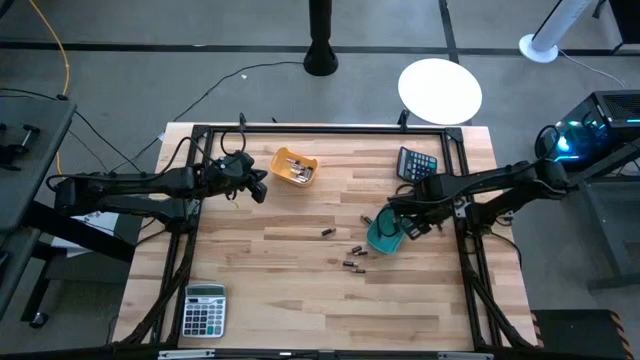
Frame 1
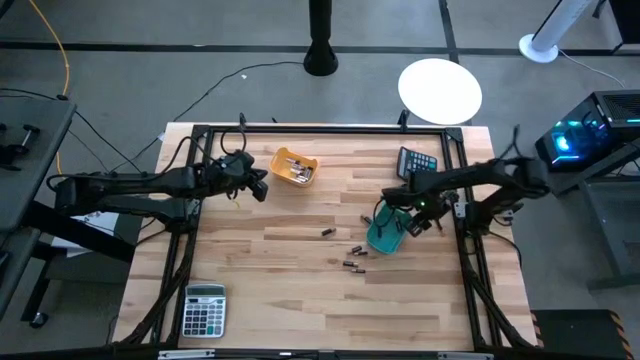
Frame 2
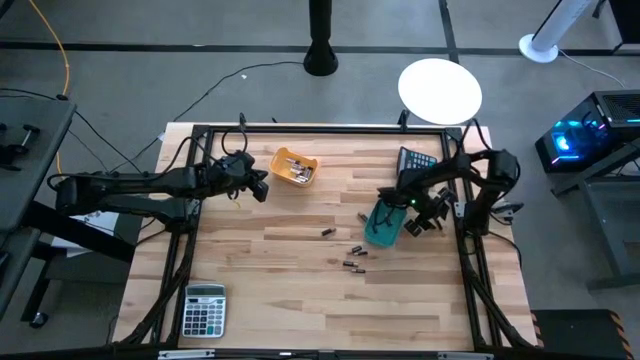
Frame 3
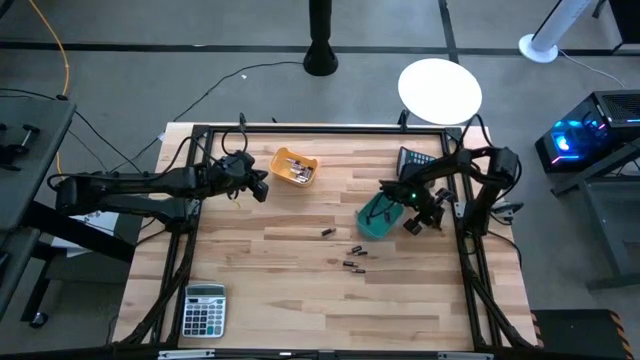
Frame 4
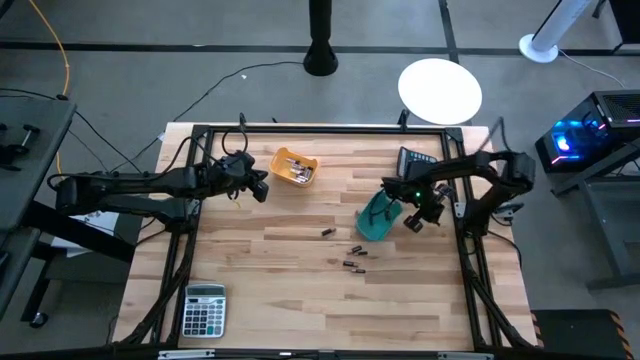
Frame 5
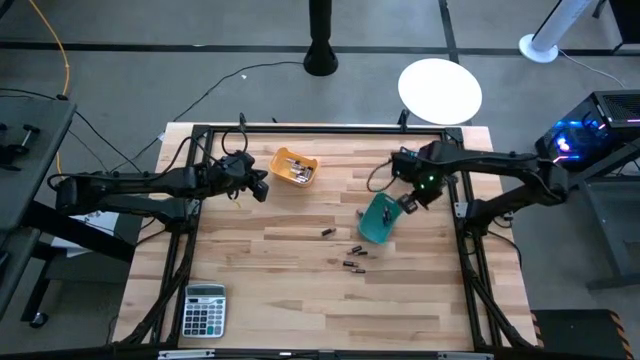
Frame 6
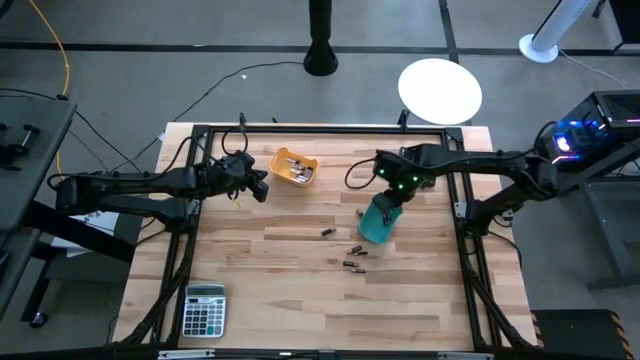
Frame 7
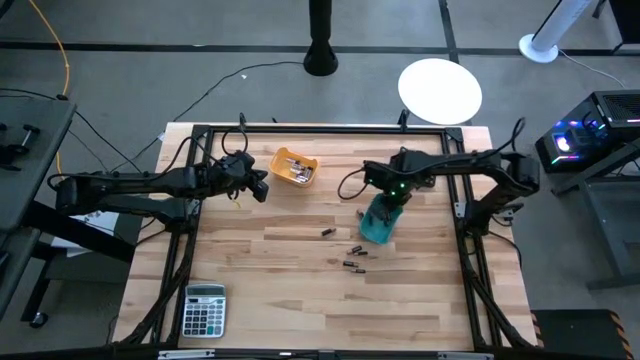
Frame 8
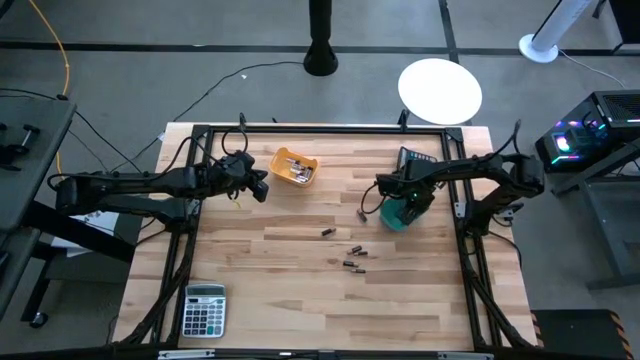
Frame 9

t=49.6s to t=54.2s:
Task: Sort batteries
Put the black battery into the blue bin

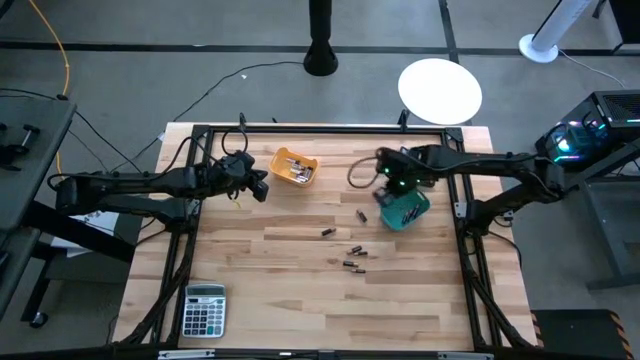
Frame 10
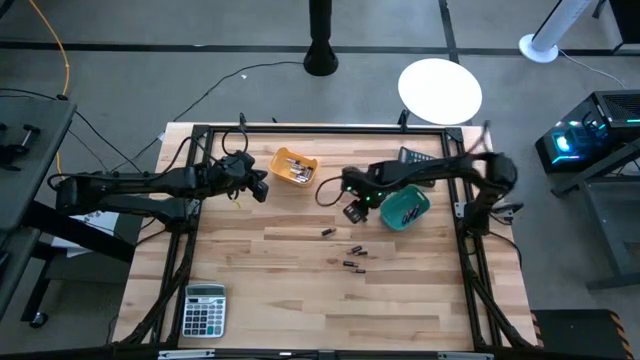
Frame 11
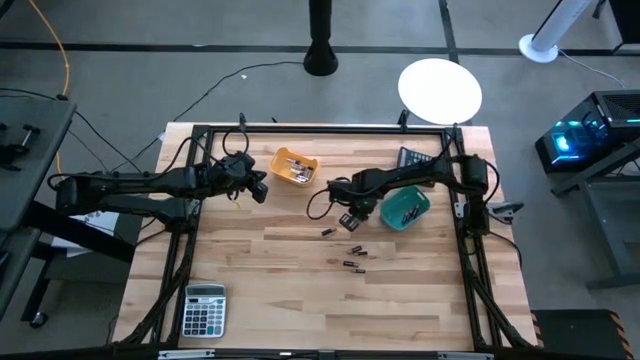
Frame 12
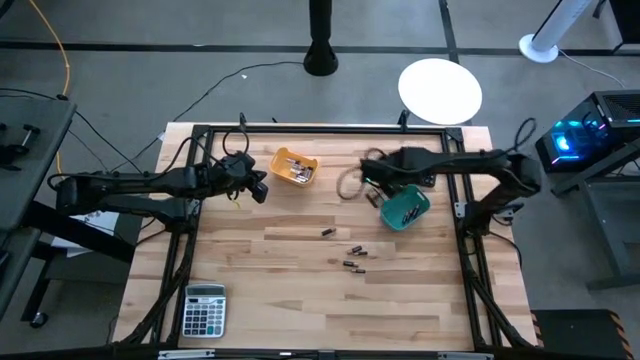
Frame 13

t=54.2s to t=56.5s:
Put the black battery into the blue bin

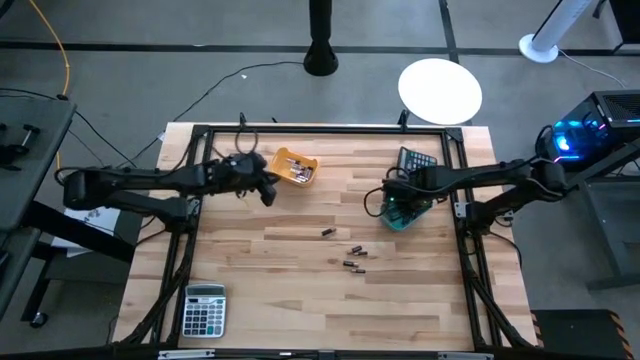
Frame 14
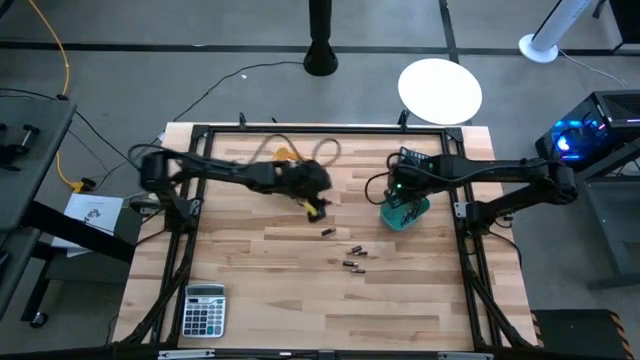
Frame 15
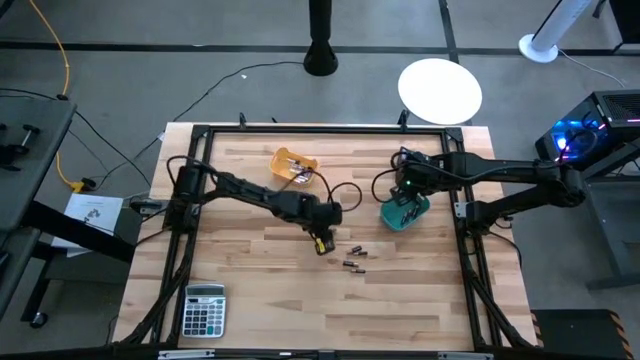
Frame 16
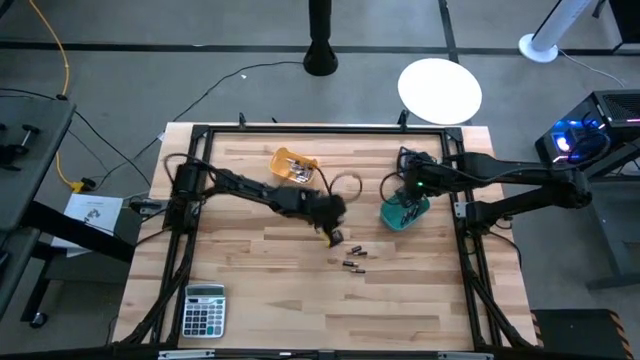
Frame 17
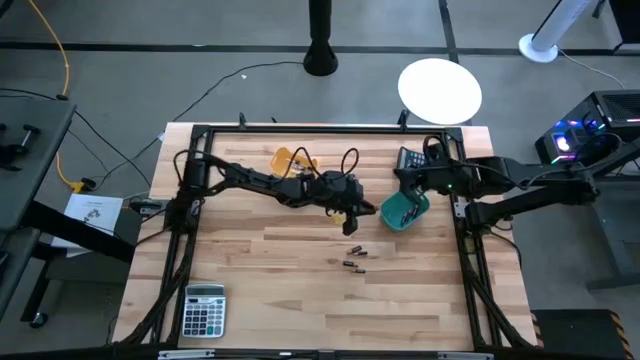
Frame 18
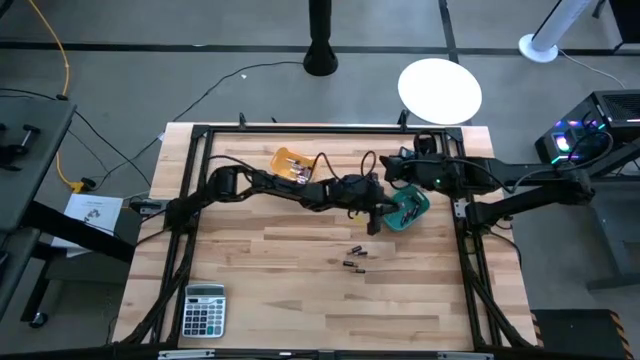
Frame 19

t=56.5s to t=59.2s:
Put the black battery into the blue bin

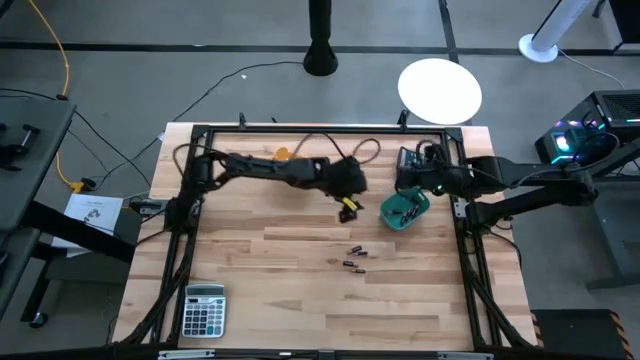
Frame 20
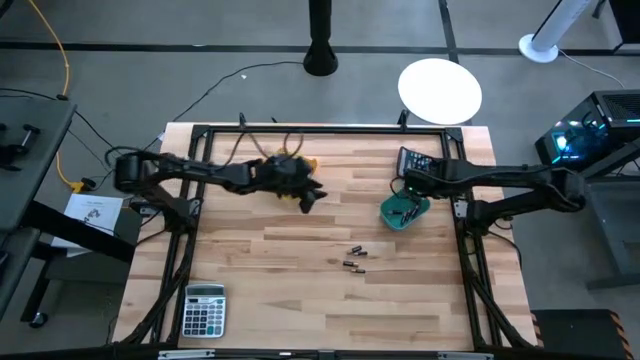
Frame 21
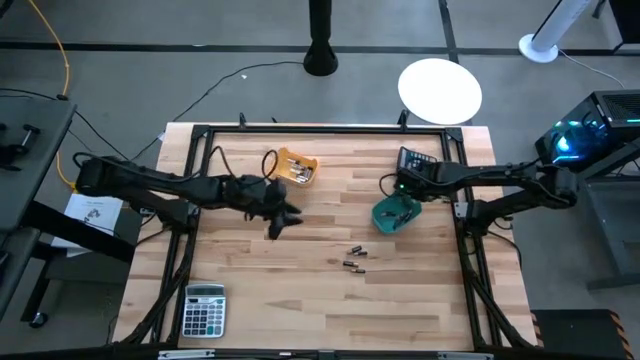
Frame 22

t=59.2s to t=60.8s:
Adjust the blue bin

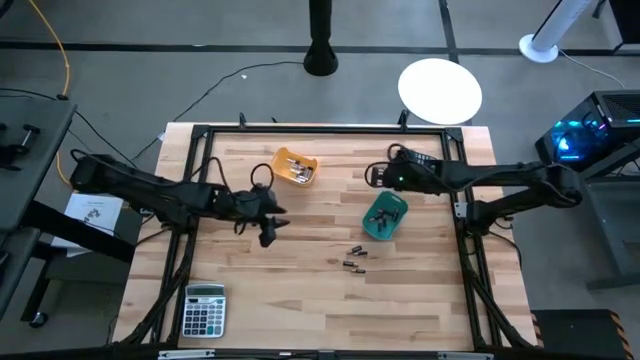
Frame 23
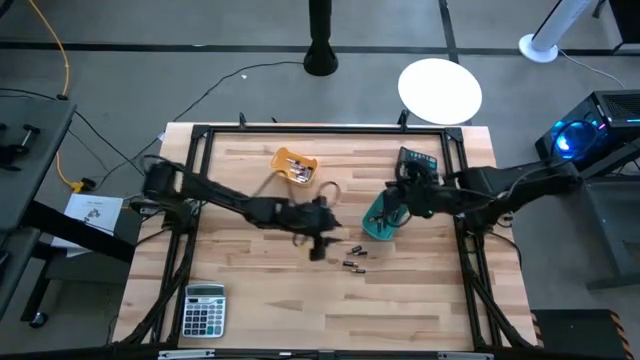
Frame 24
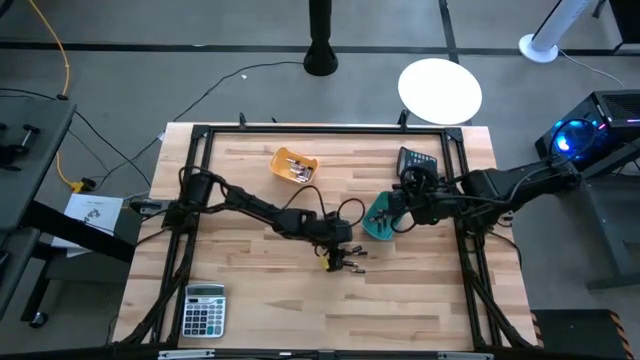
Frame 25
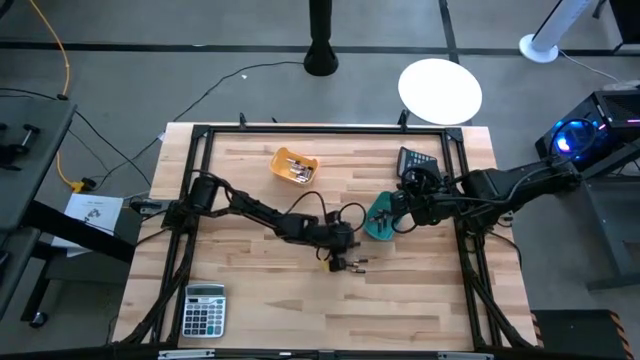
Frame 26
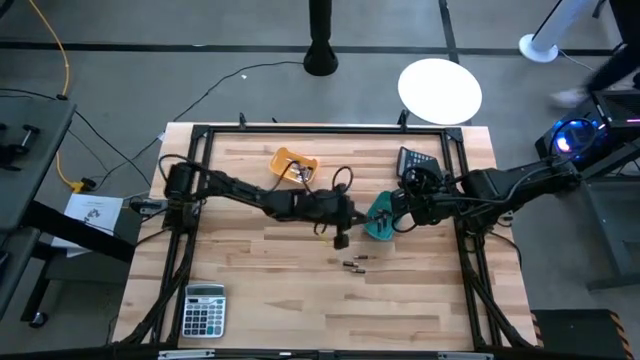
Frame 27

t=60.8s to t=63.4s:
Put the black battery into the blue bin

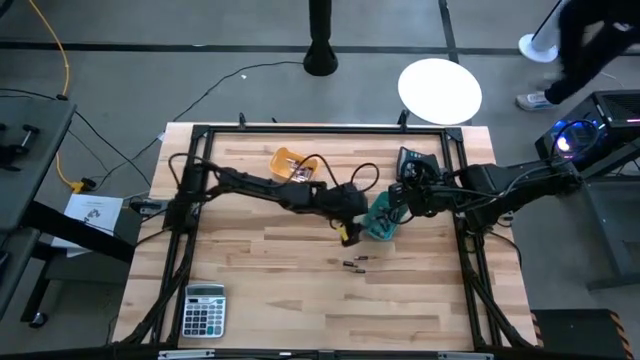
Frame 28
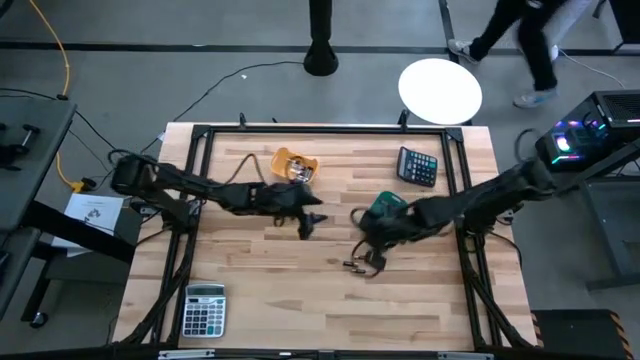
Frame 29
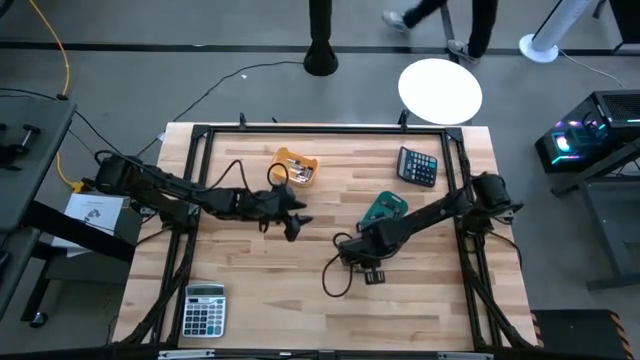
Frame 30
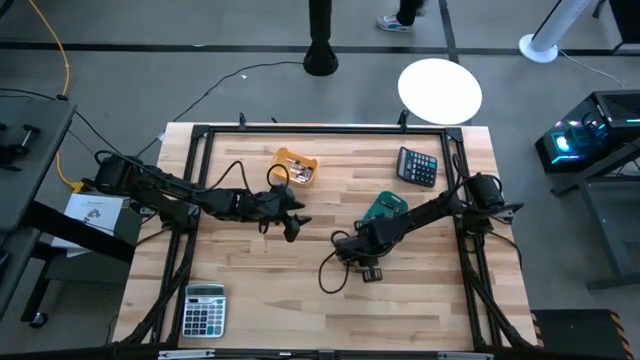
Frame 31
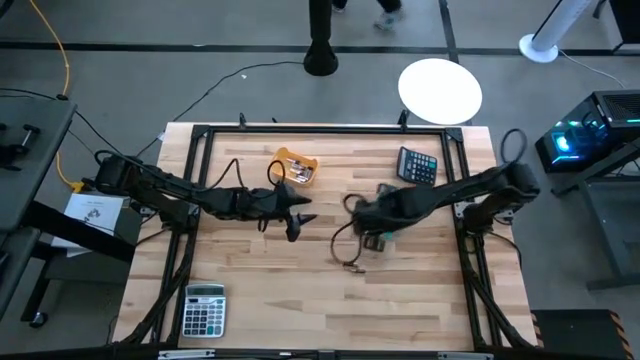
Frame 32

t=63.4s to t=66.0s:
Put the black battery into the blue bin

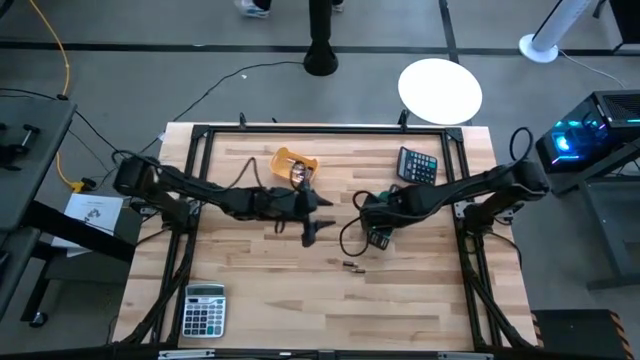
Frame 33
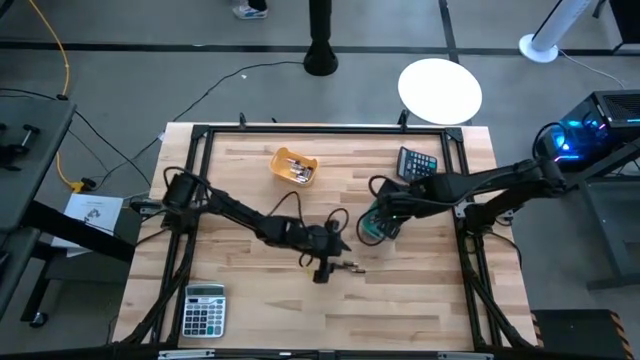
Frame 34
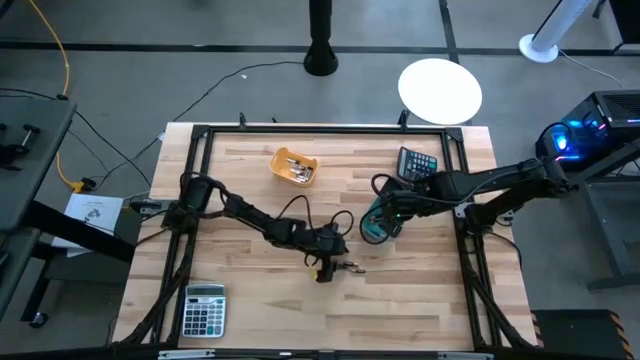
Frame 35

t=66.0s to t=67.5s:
Put the black battery into the blue bin

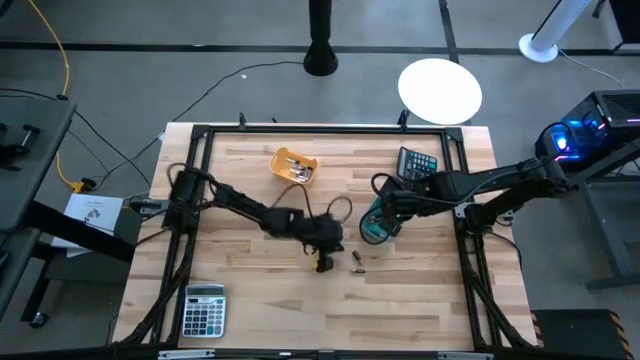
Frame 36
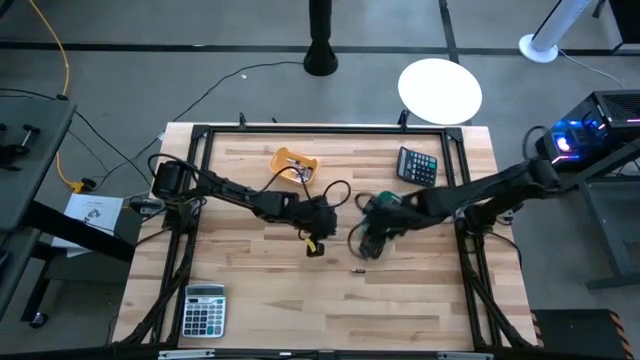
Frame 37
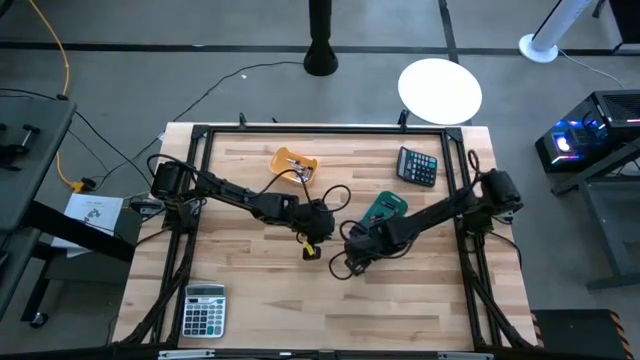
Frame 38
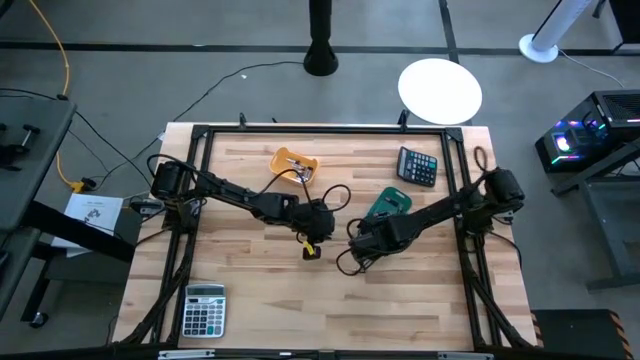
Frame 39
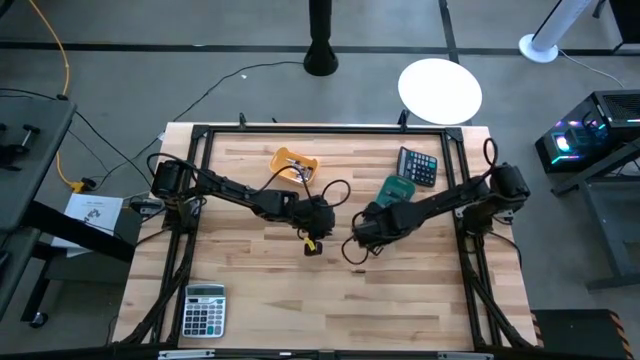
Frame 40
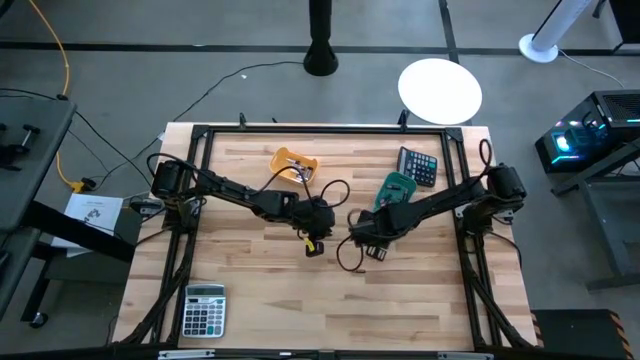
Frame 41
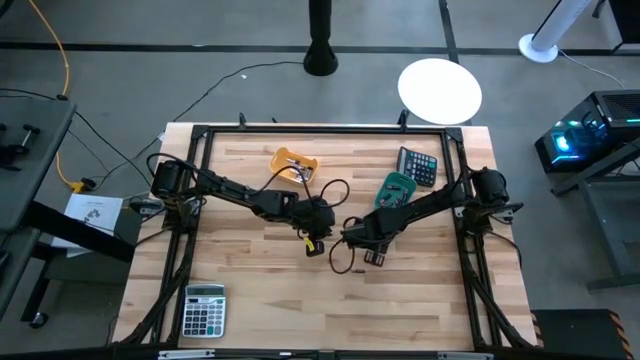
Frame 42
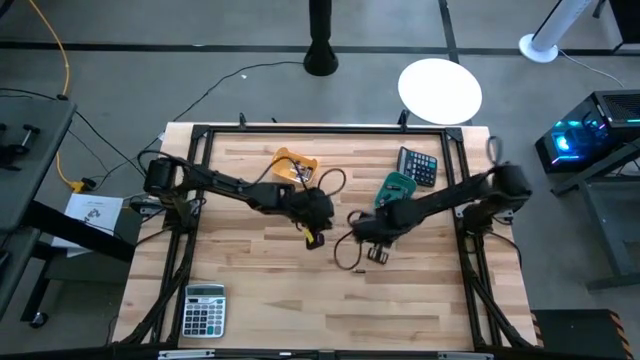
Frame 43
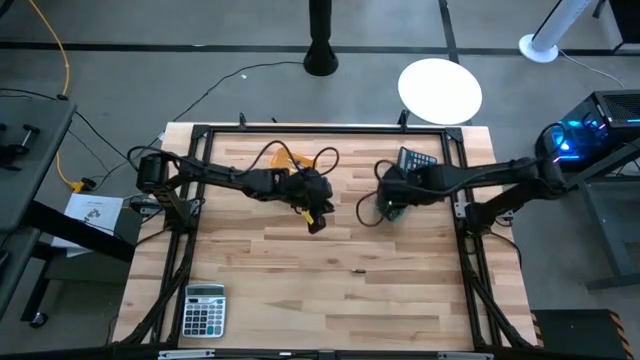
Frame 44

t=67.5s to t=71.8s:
Put the black battery into the blue bin
